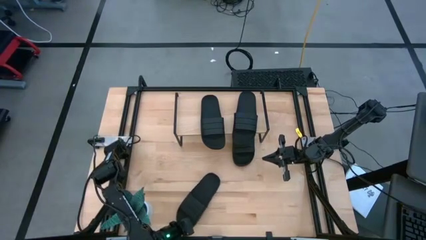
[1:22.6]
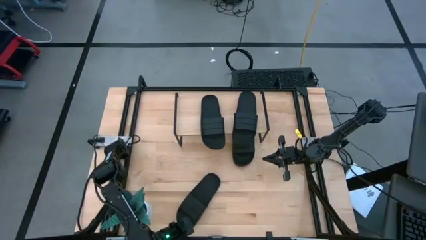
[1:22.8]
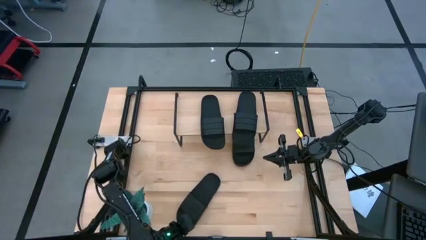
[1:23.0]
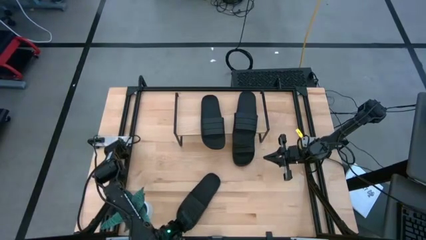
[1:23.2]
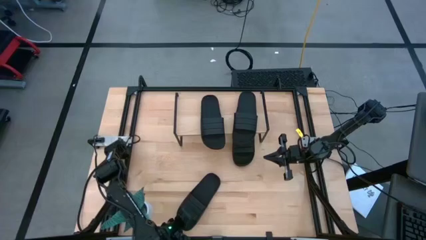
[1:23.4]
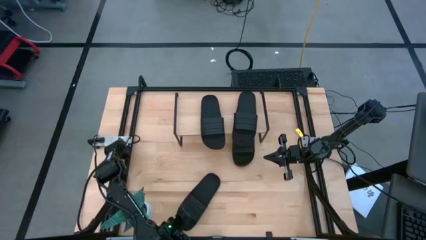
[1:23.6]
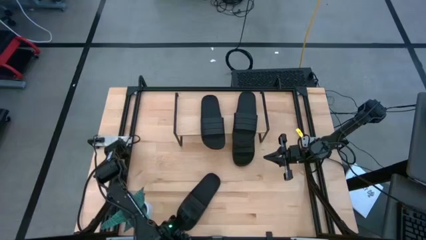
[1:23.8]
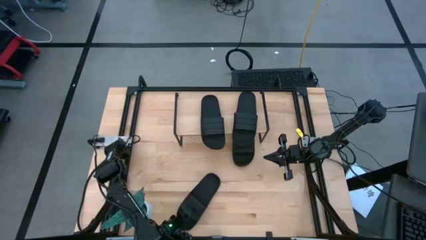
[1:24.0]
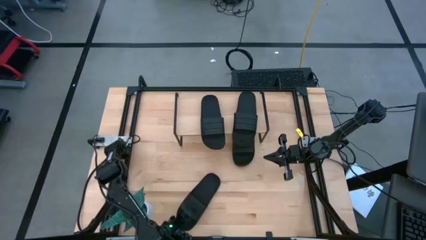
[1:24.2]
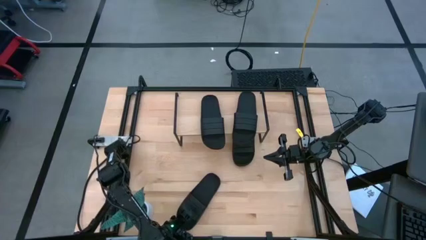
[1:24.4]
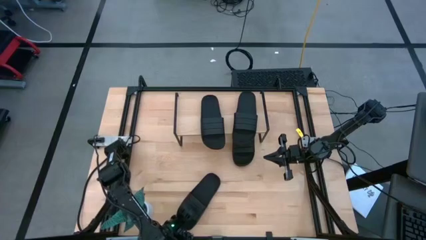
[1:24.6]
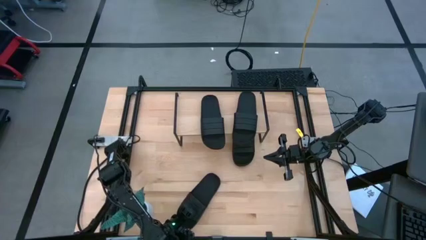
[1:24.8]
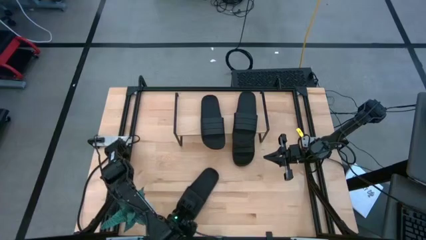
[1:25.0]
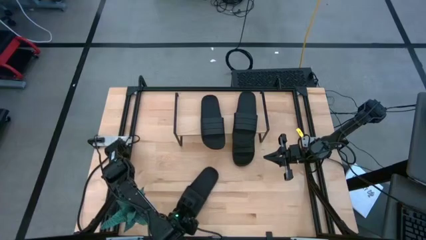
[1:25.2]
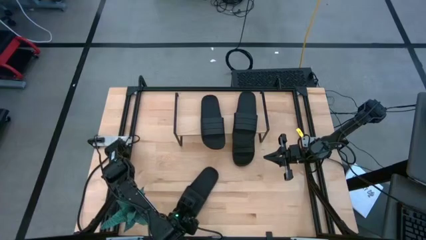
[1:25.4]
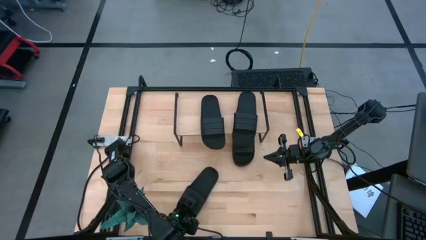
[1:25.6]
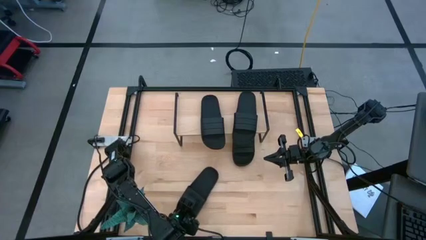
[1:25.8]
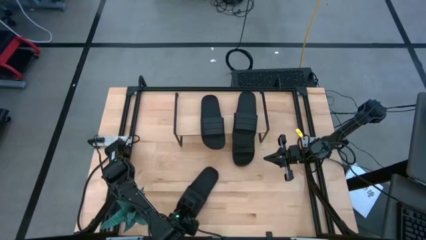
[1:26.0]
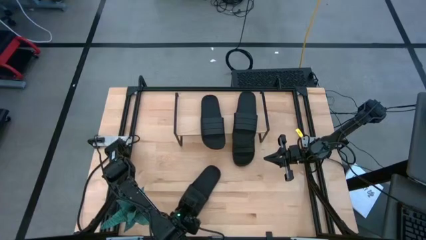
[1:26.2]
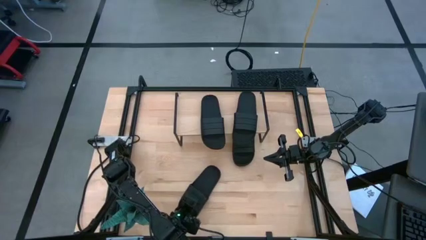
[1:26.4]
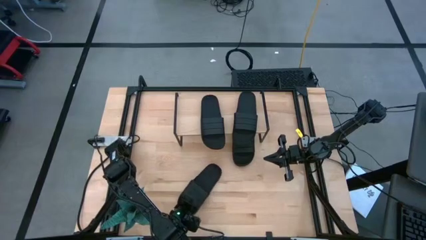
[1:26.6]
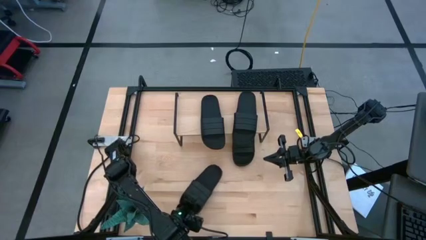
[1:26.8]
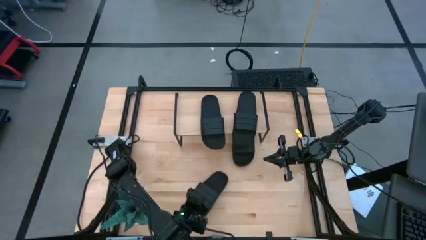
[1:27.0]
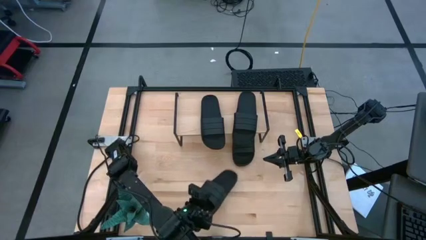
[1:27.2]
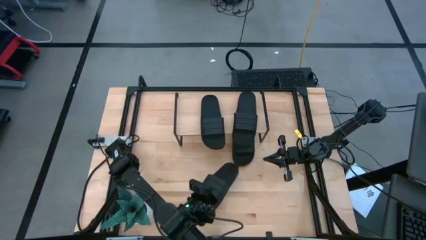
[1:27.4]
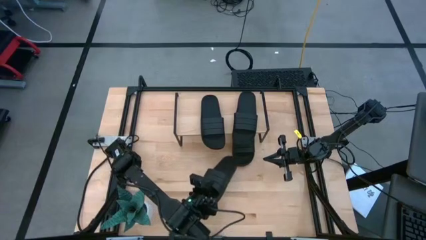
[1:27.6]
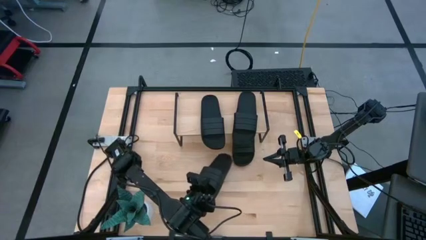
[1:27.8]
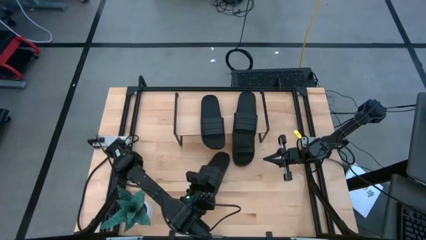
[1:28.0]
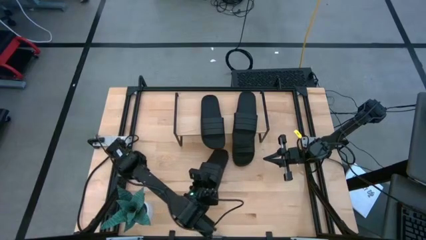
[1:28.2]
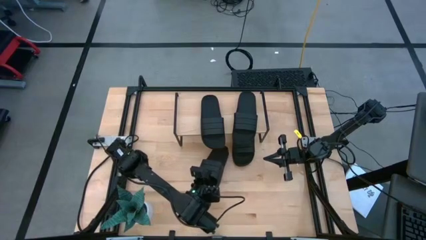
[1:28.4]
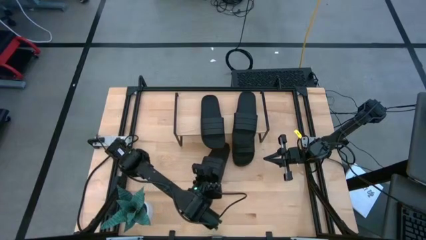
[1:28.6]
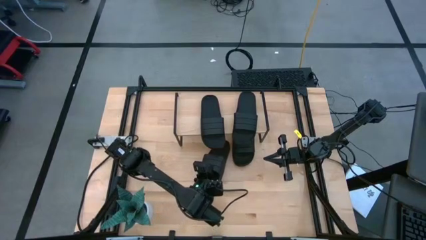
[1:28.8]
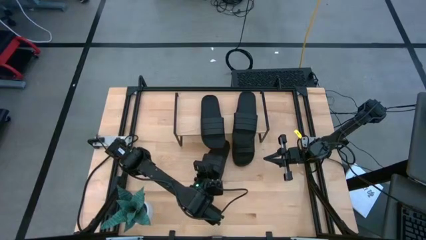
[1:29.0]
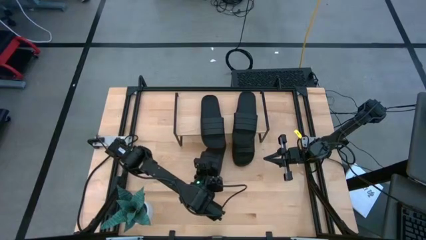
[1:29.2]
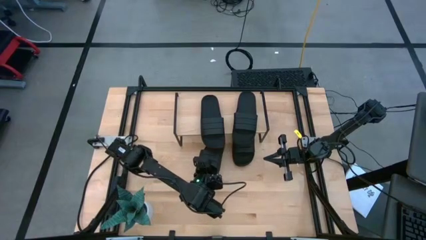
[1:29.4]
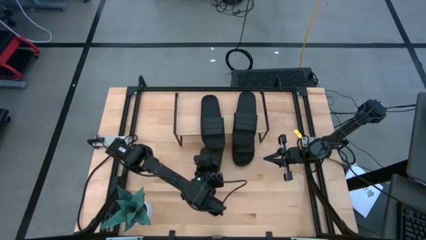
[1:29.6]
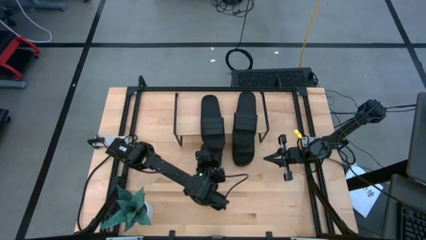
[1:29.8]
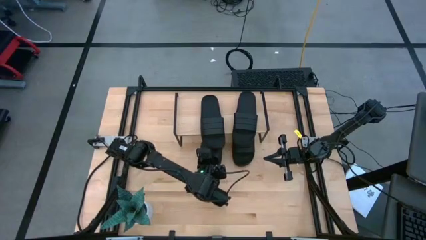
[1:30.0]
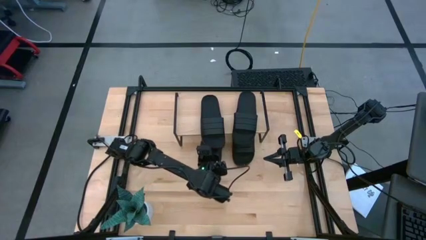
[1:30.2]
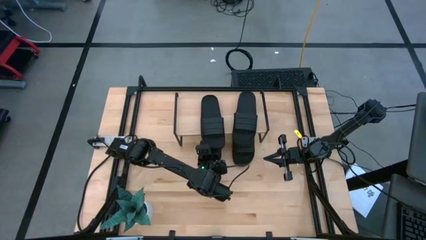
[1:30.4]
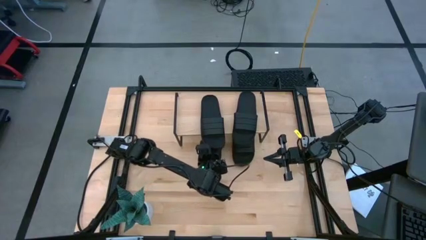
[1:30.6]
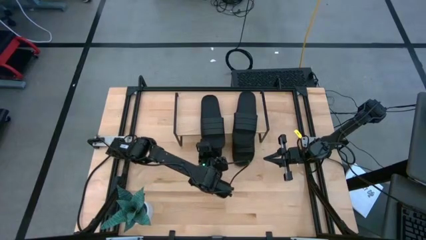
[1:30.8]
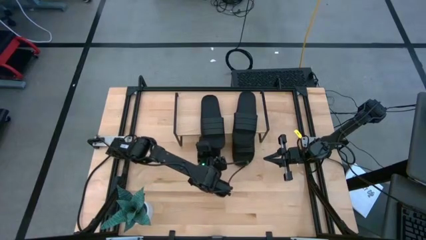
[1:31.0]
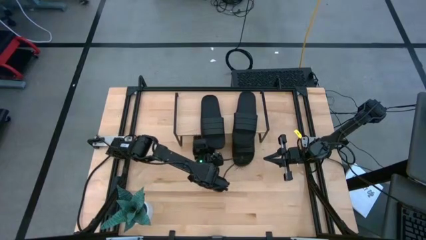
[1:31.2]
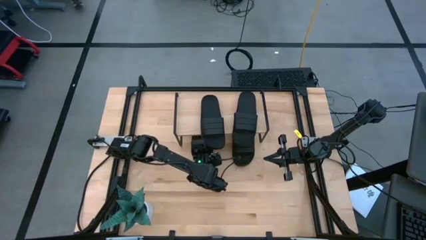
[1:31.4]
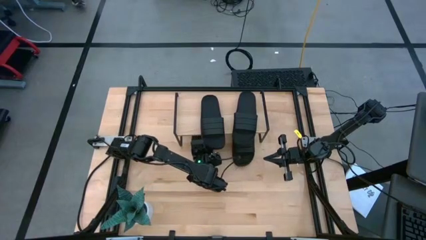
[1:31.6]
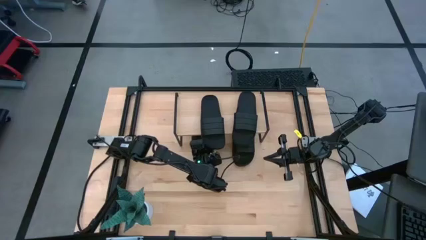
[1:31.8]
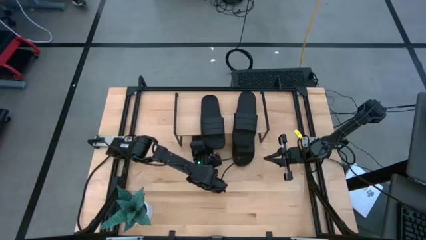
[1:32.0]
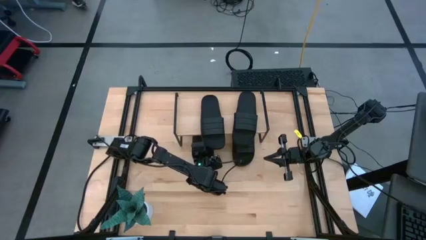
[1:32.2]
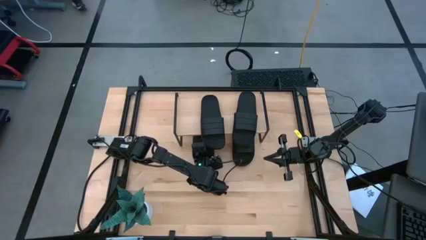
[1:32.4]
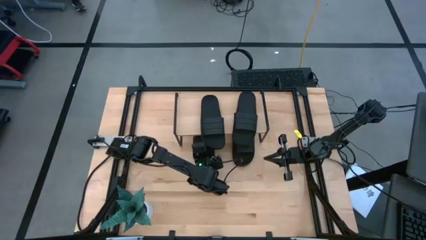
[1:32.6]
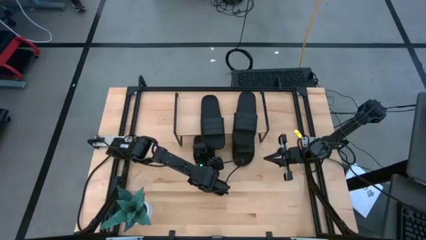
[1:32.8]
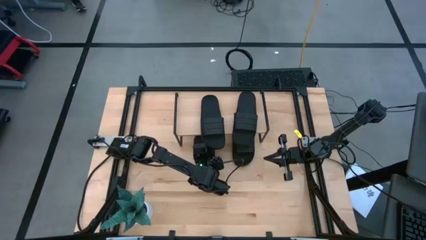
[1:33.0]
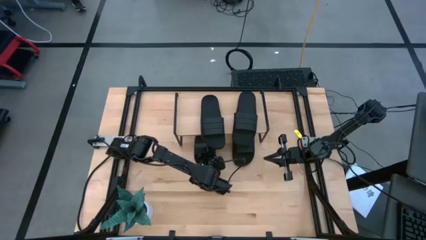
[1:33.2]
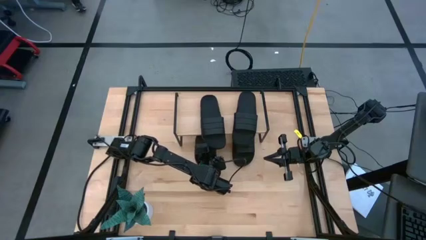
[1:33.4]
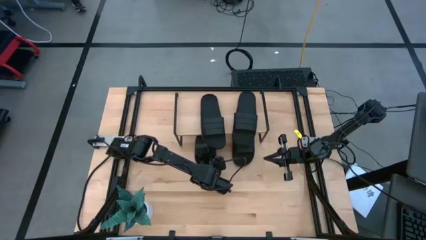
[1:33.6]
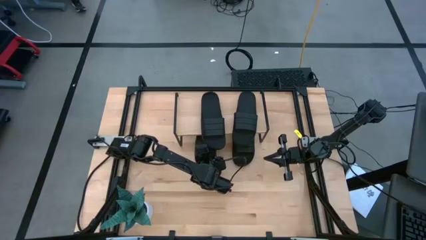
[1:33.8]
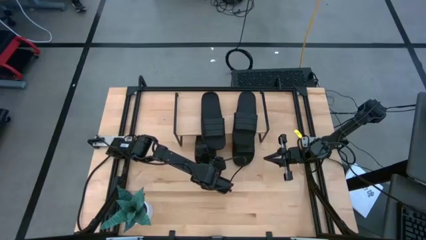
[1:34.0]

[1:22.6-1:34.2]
Task: Pick and place slides into the shelf
Put the black slide under the shelf
